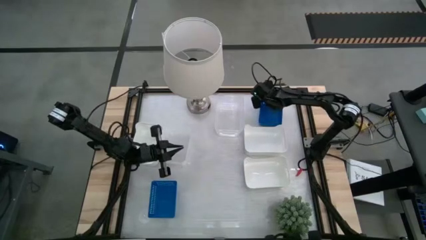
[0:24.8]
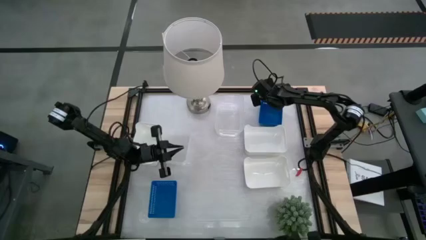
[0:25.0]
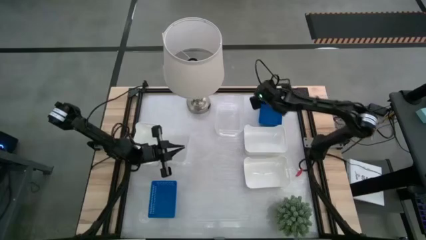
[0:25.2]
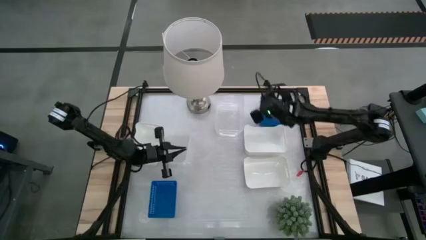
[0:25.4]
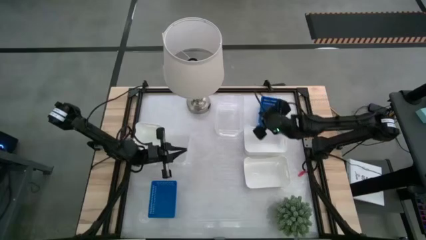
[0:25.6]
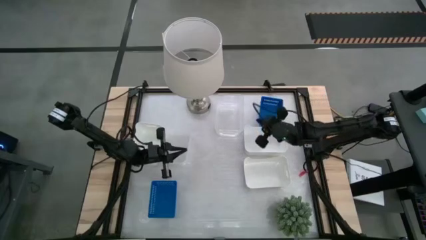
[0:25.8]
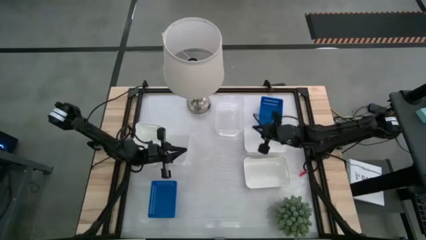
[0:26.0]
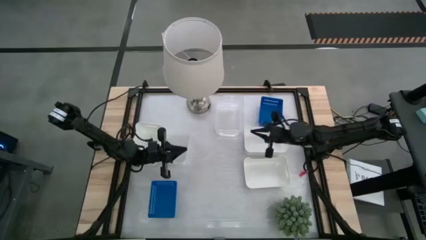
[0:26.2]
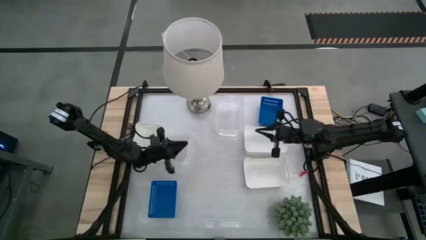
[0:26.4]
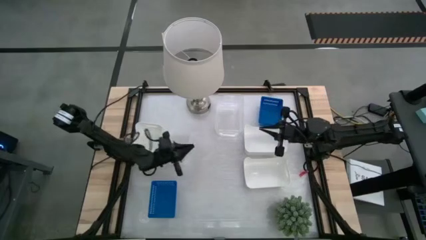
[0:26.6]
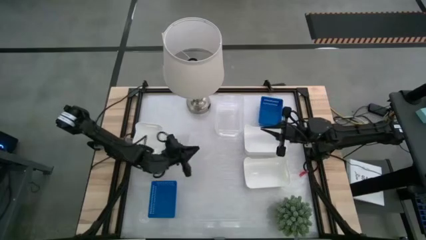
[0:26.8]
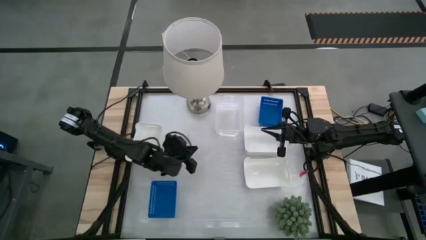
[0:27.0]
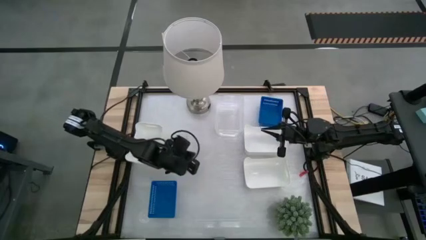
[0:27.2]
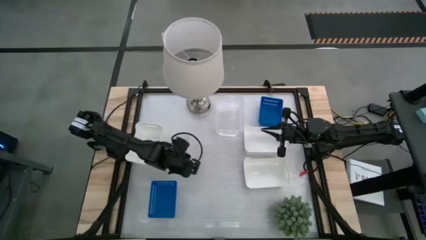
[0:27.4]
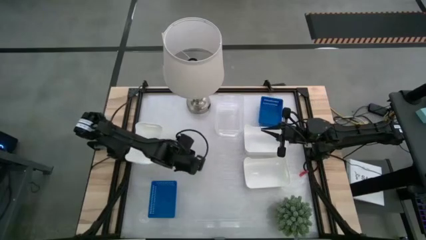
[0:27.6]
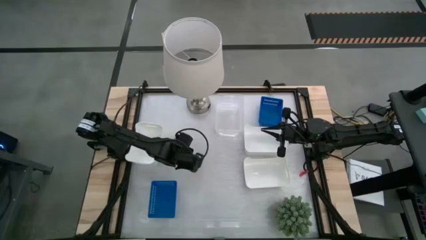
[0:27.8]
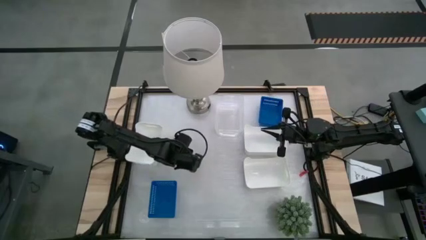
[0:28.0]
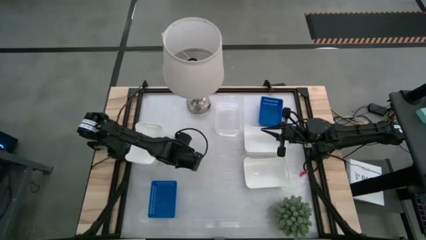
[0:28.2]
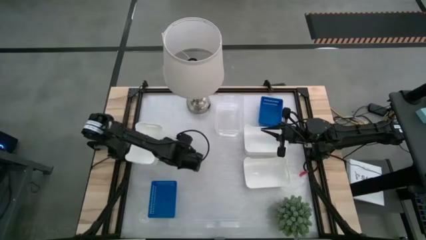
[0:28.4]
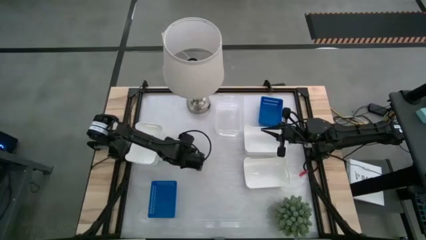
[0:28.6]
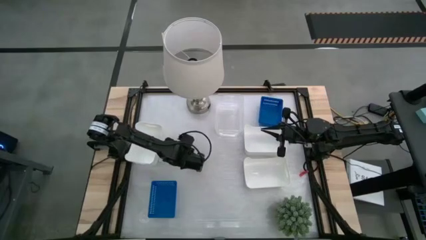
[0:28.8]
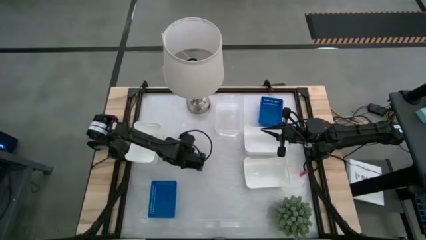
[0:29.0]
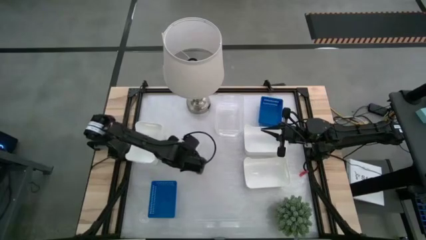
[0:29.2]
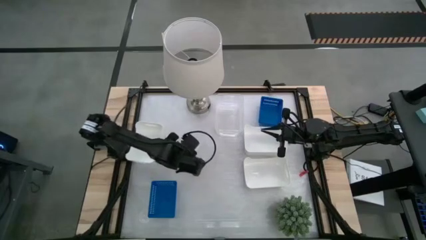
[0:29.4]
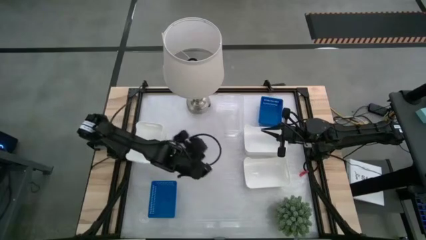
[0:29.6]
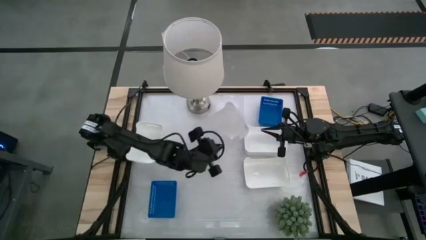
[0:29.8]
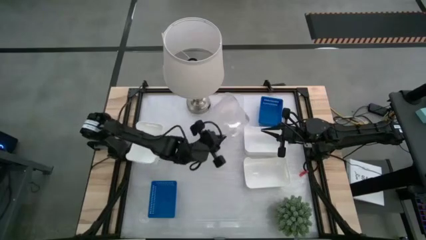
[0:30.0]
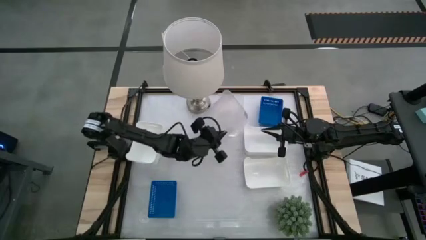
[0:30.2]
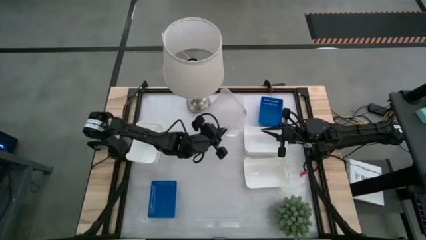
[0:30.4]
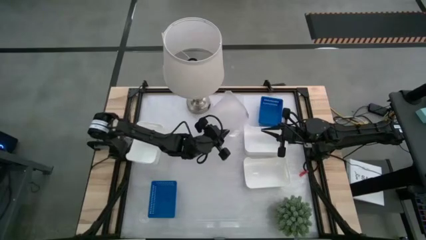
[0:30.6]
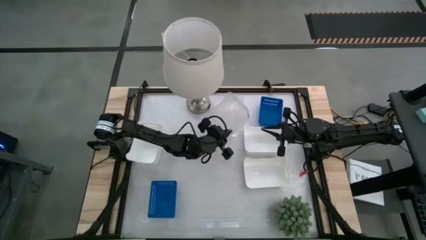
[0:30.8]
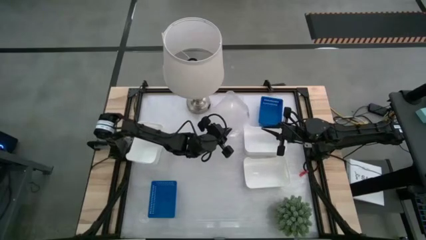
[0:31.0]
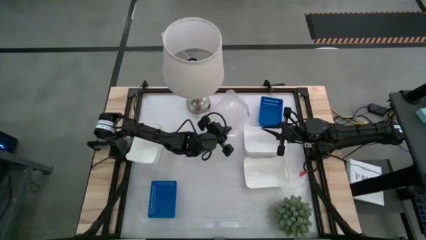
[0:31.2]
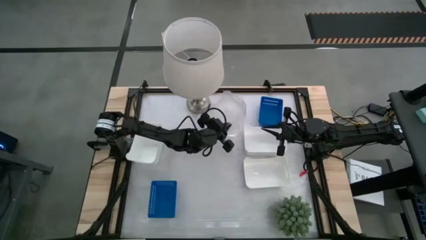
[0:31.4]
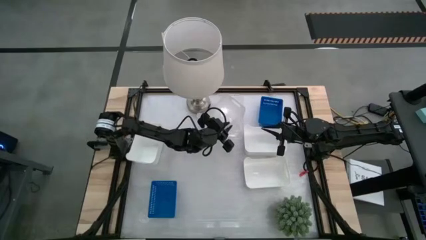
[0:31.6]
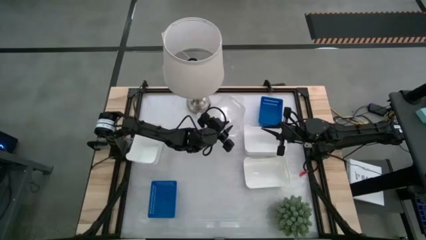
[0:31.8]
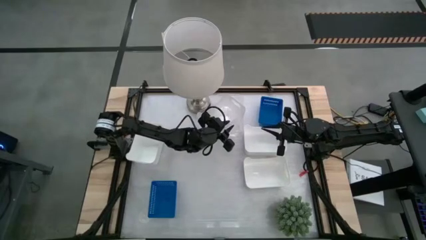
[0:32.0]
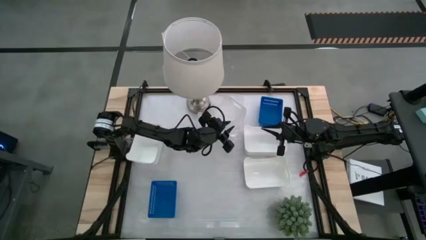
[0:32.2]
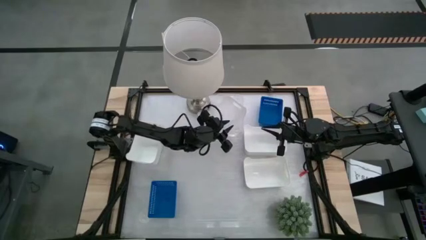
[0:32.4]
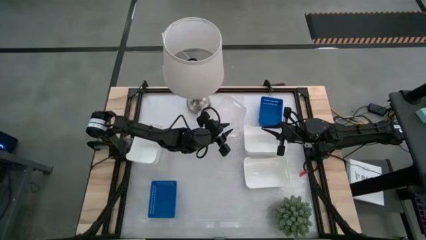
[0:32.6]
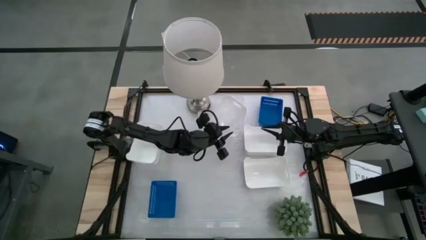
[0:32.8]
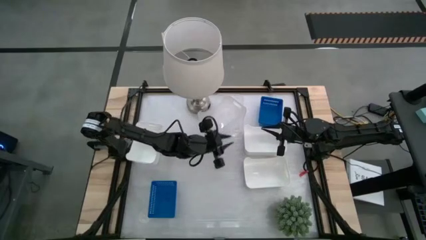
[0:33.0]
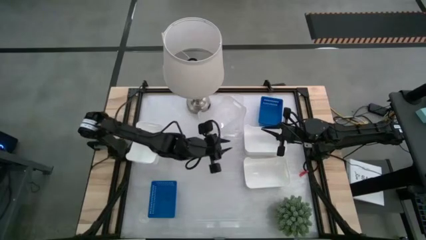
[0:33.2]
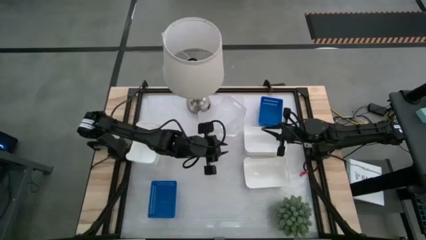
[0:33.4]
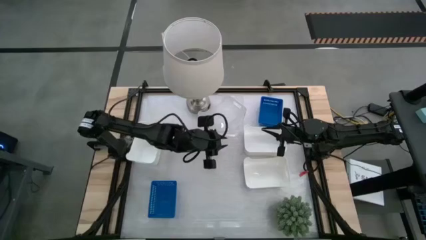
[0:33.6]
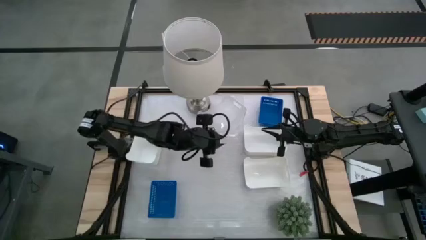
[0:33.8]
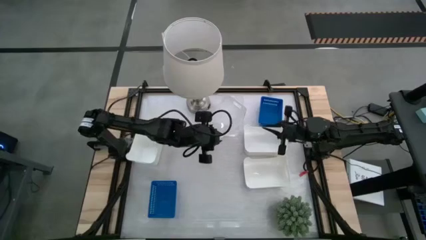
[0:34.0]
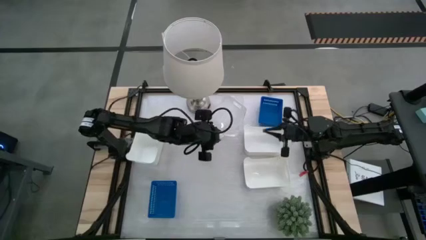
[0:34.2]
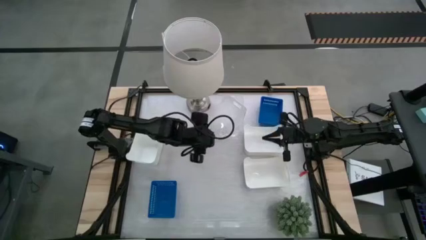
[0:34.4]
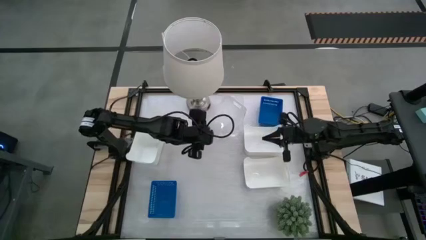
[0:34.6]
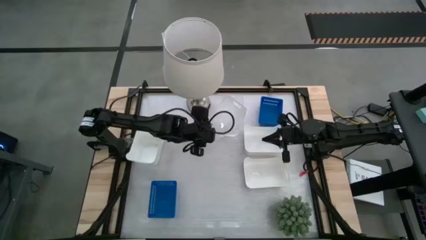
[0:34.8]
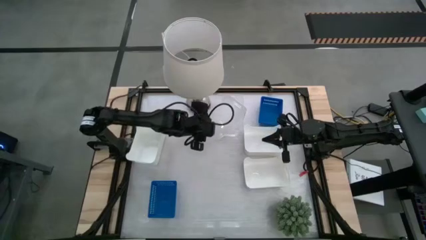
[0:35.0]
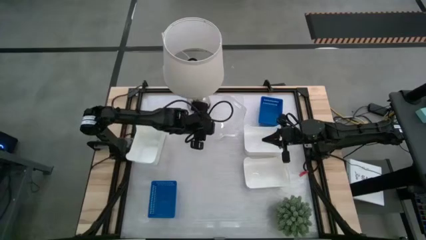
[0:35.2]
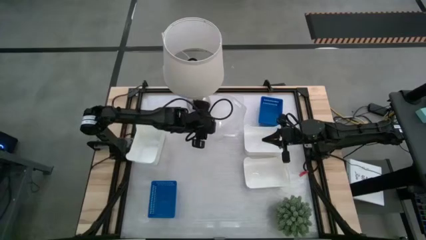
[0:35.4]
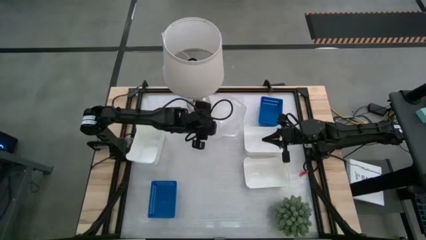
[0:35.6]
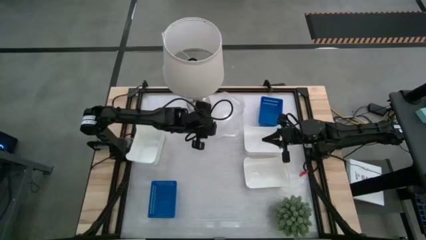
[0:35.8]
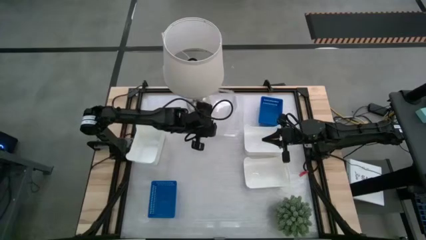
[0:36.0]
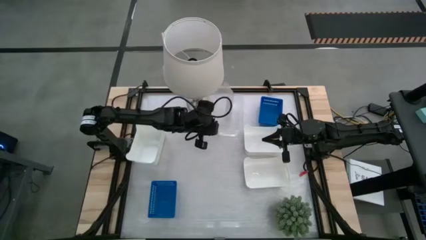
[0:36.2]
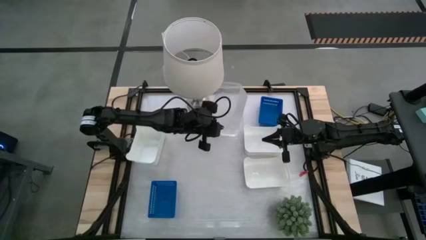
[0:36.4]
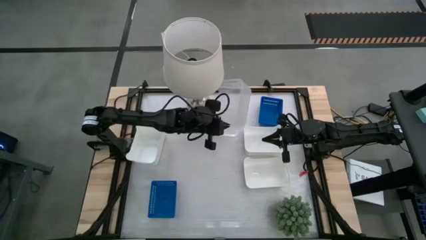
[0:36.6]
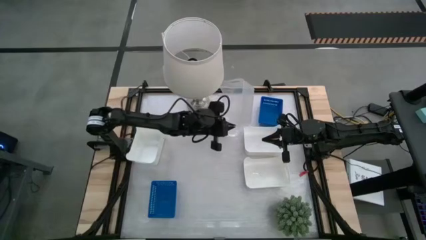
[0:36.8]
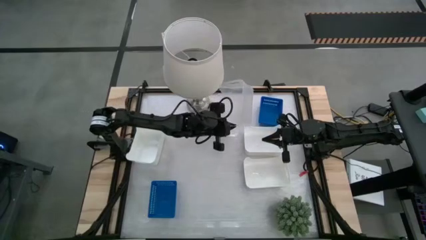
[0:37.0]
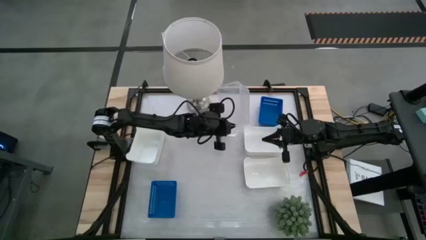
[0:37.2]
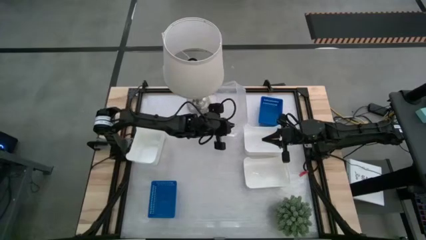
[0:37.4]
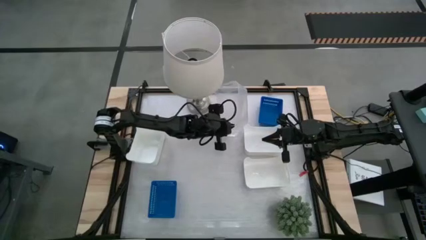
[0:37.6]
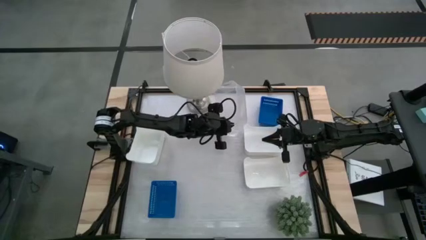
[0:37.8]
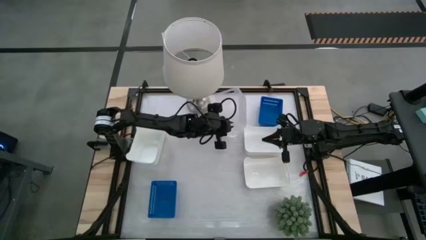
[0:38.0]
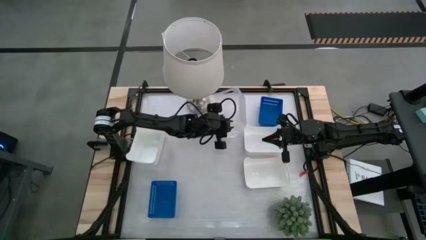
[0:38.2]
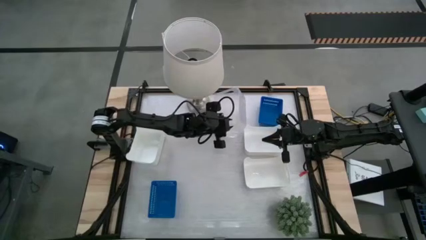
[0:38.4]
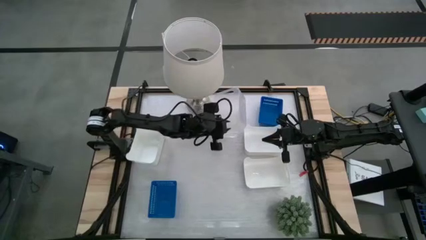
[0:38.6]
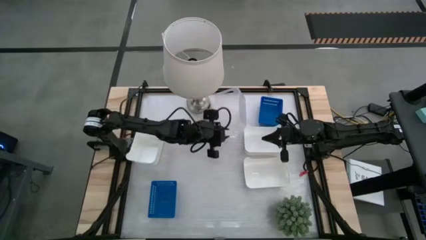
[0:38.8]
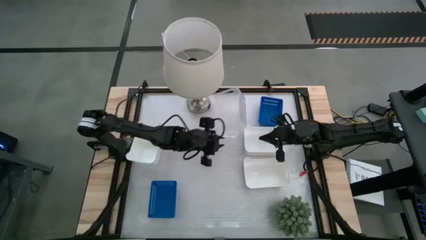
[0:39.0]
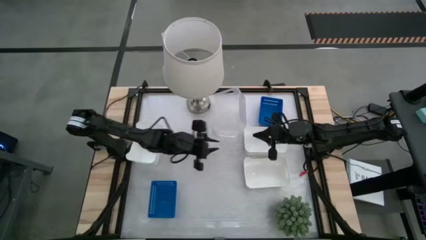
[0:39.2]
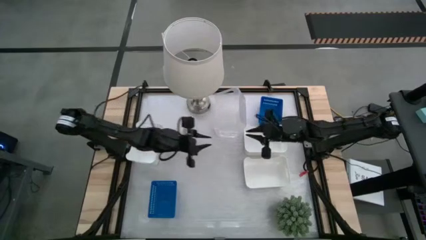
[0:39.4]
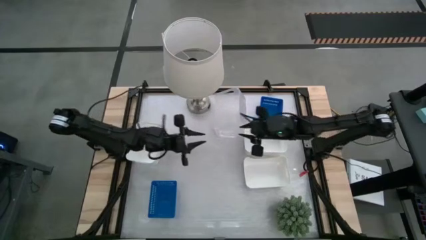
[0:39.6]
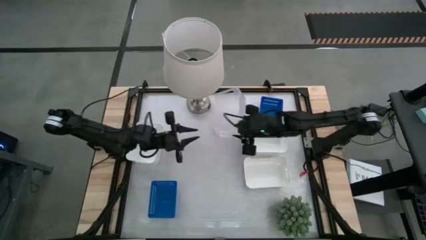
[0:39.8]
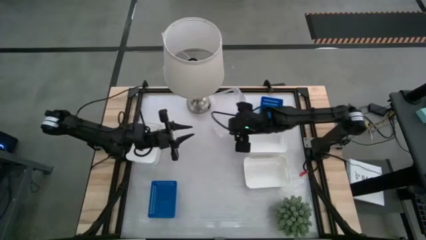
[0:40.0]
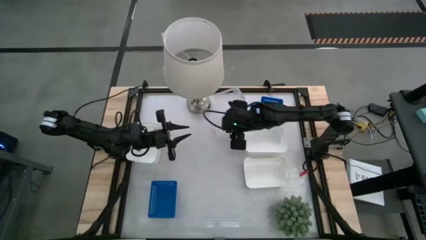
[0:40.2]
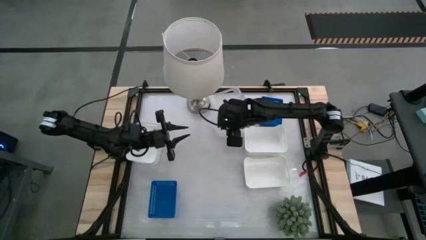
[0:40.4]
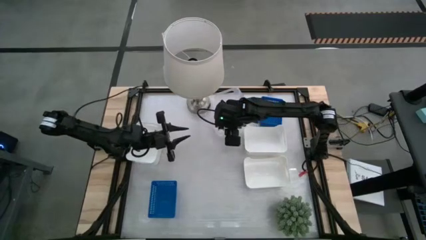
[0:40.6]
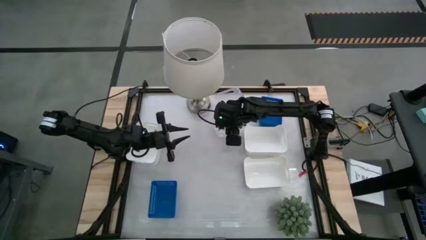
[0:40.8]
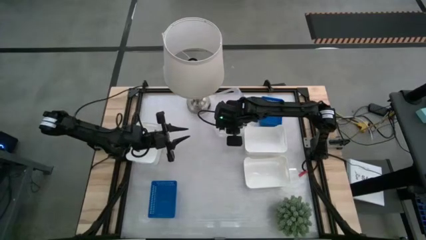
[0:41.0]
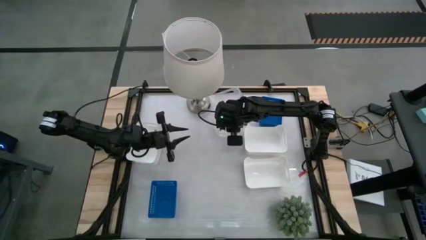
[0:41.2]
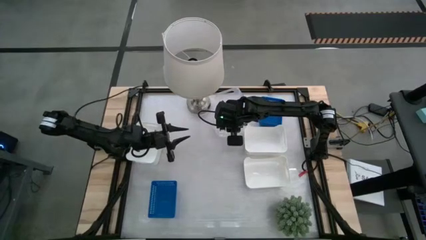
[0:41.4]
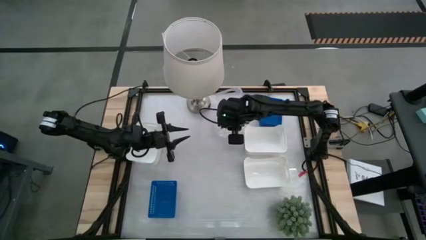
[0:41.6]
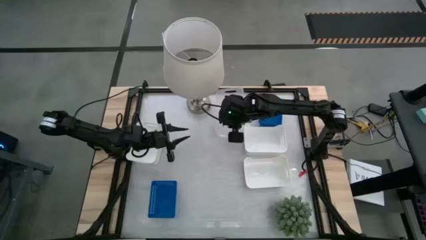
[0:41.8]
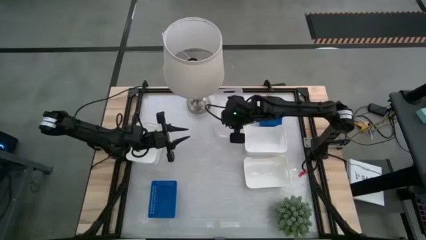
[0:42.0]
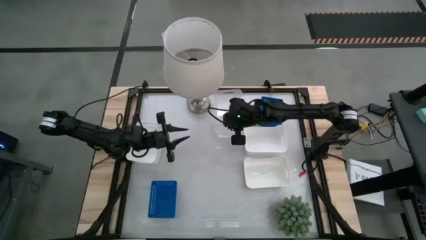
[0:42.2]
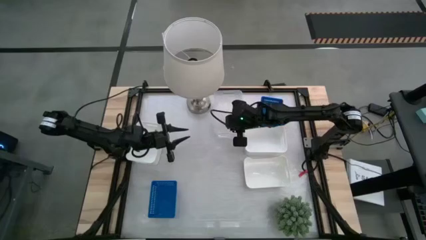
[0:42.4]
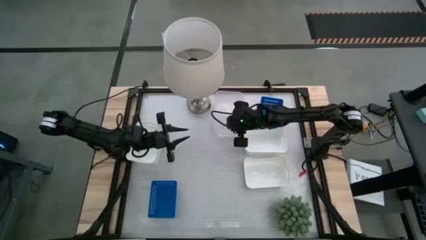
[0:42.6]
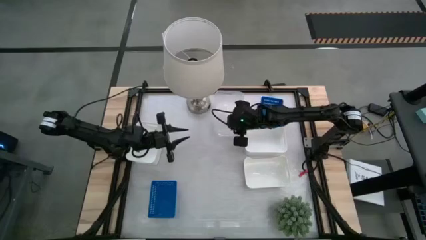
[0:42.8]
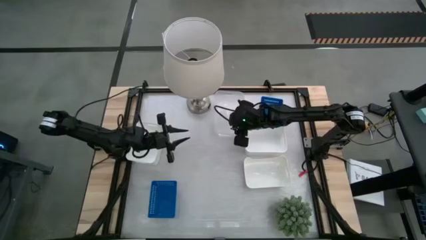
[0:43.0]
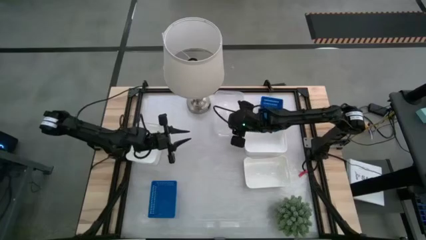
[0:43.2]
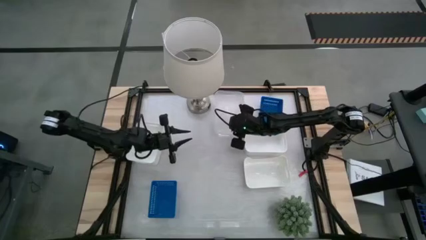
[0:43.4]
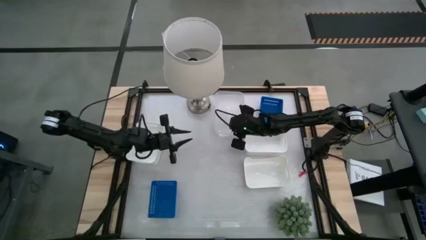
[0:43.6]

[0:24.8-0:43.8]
Stack the bottom transparent bin on the transparent bin
